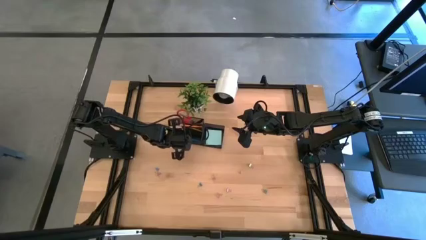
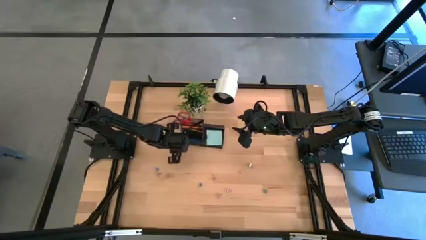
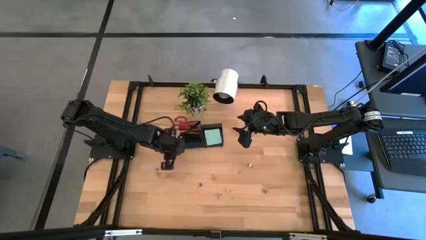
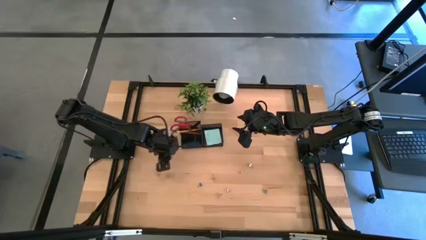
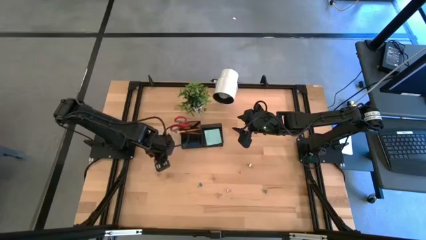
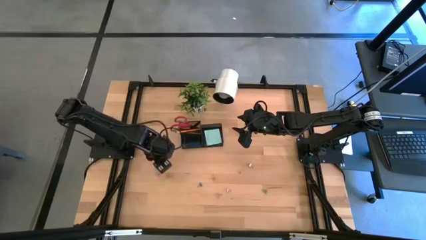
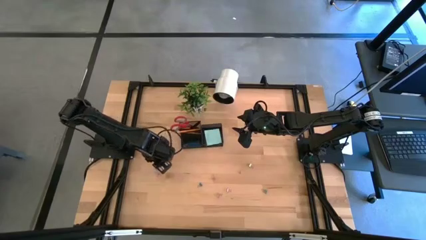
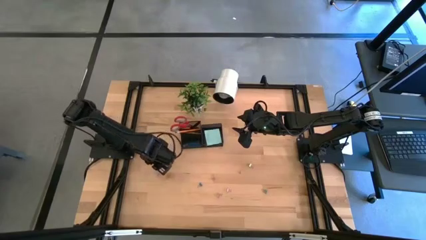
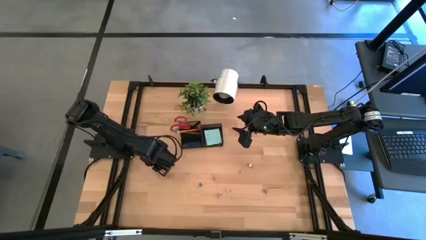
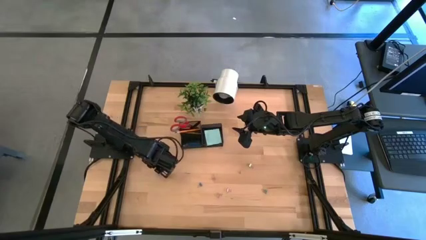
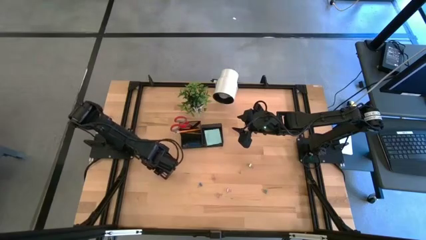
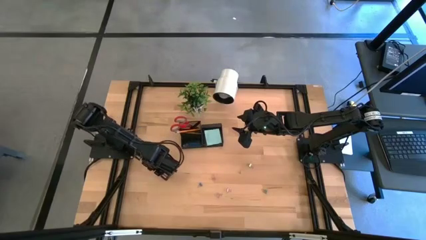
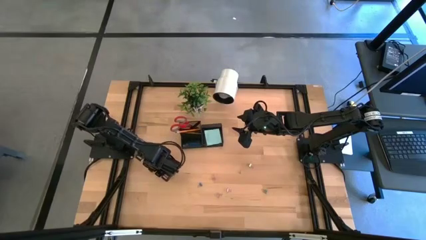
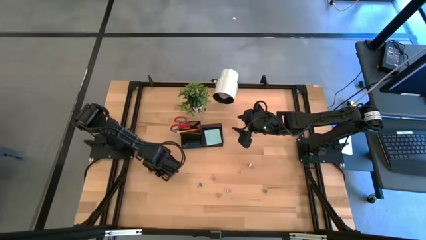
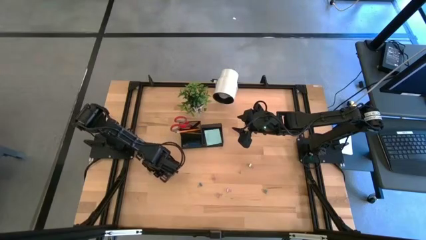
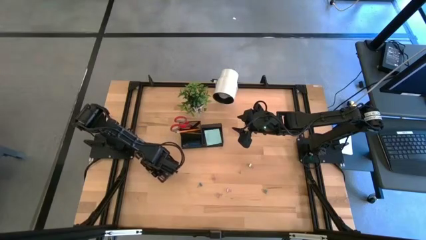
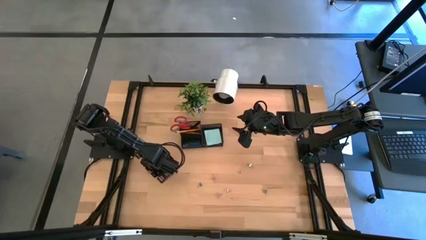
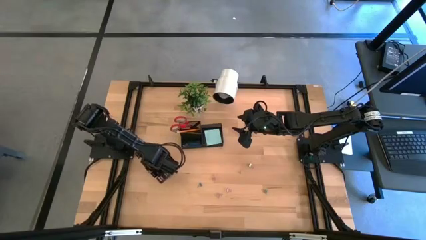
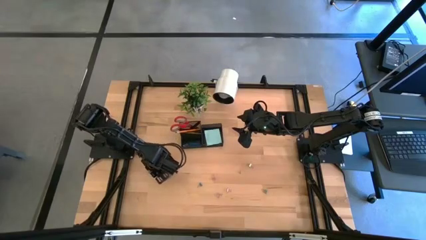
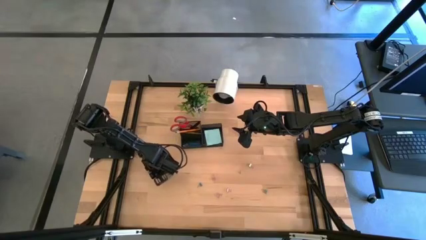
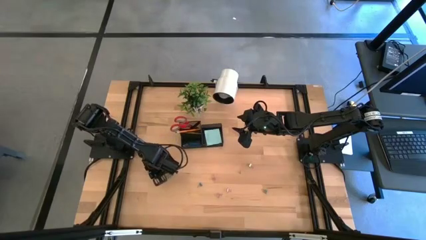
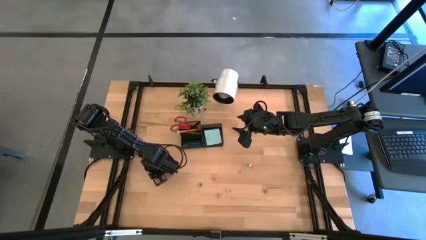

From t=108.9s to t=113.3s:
Task: Pick and place office supplies into organizer
Put the blue binder clip into the black desk organizer

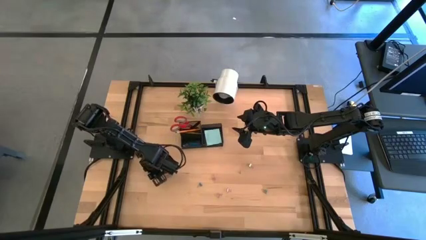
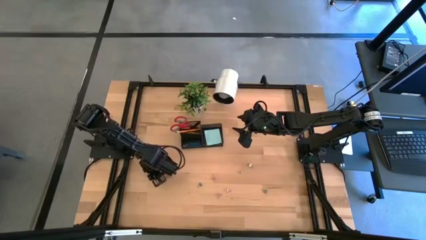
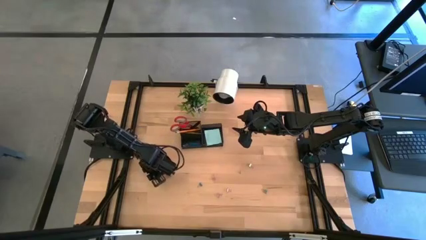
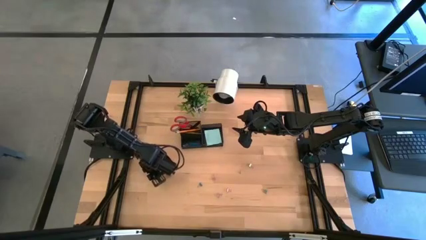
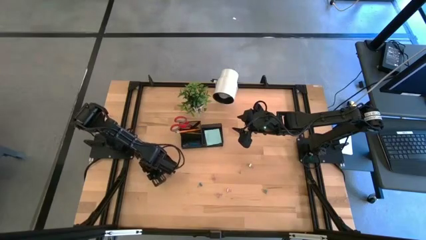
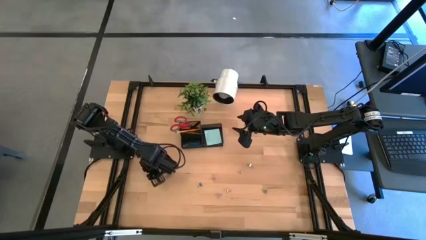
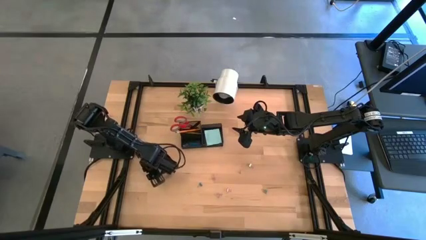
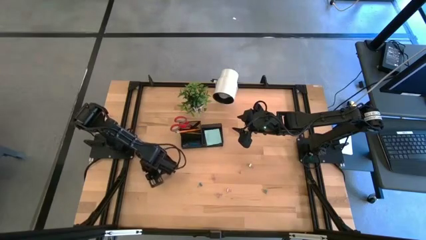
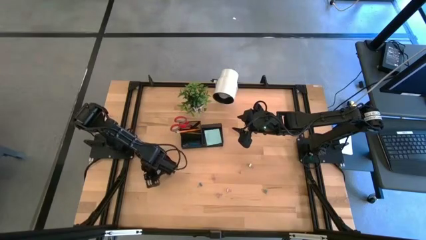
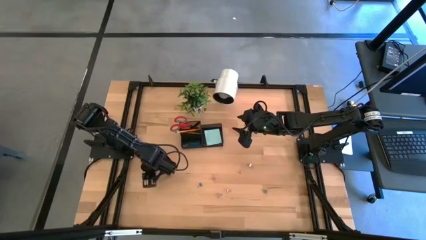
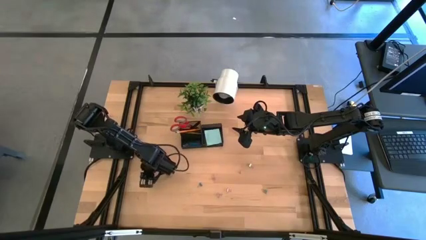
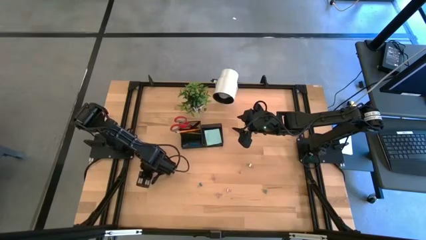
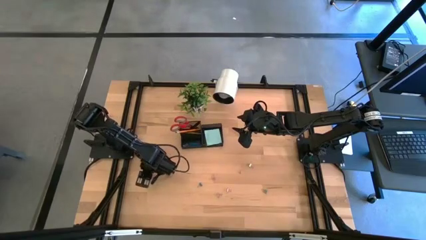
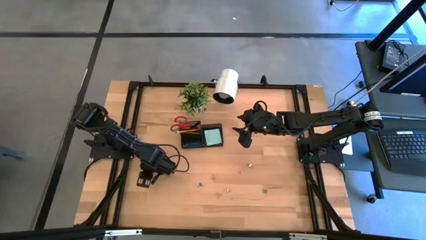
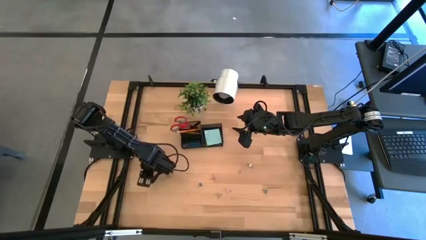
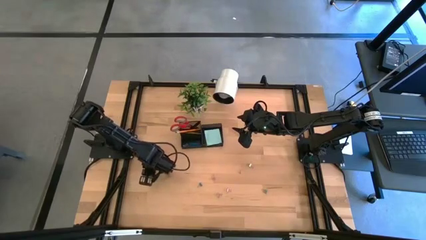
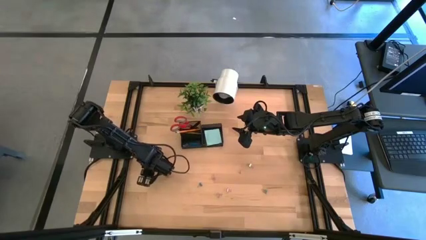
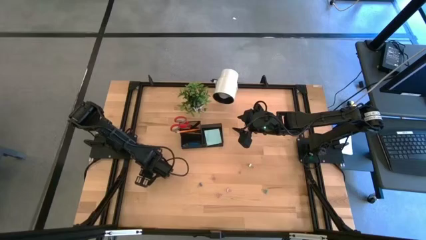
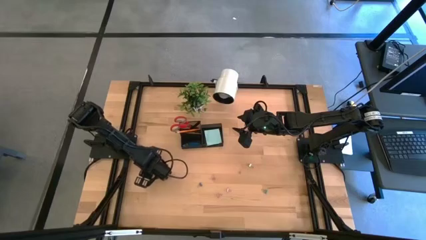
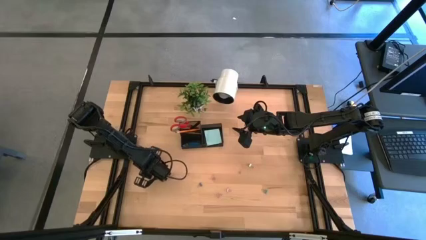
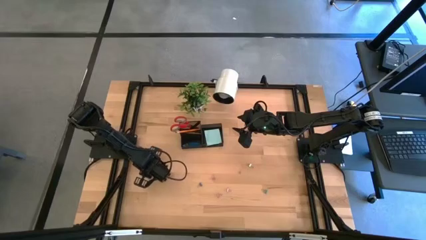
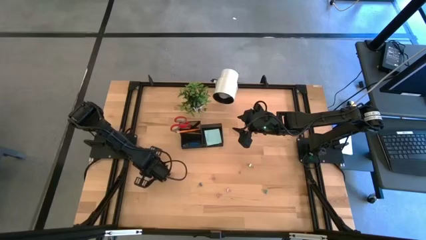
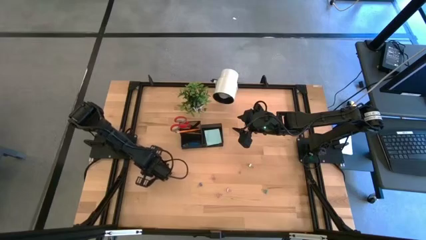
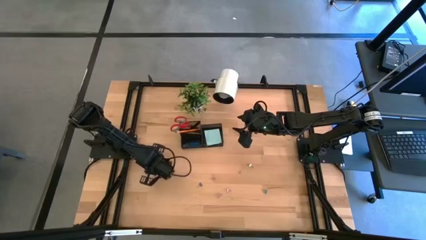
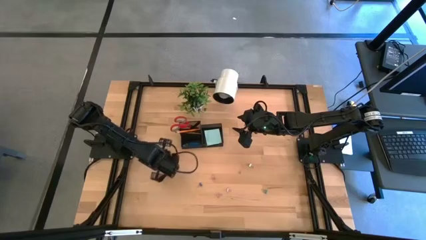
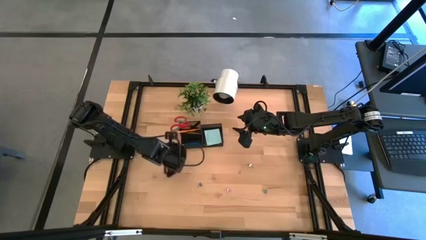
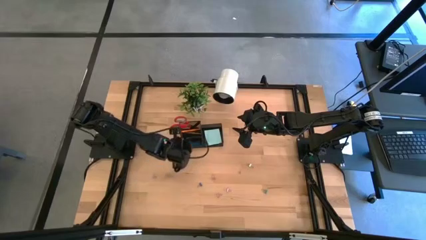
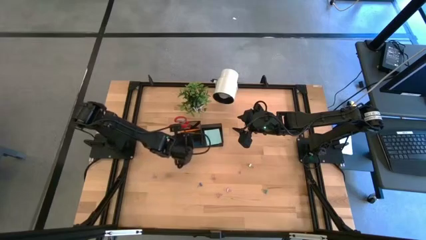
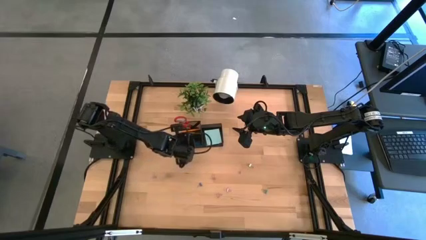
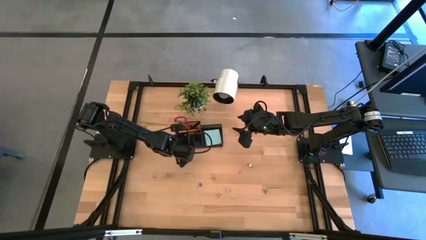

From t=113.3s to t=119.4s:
Put the blue binder clip into the black desk organizer

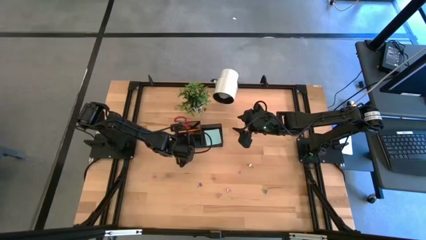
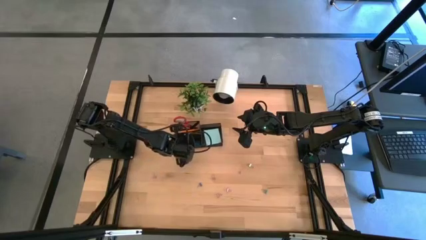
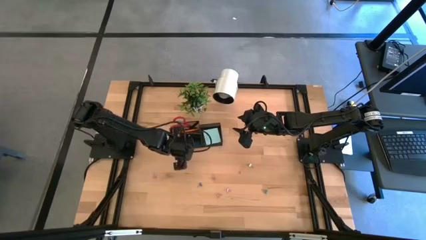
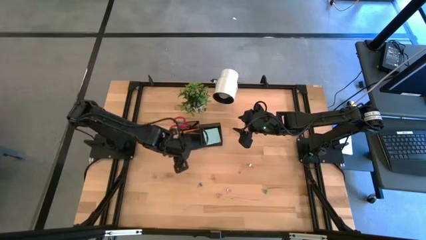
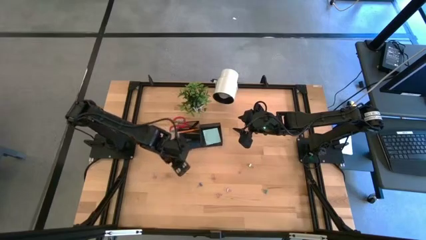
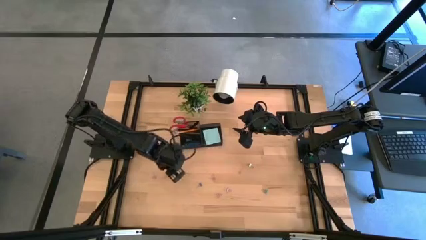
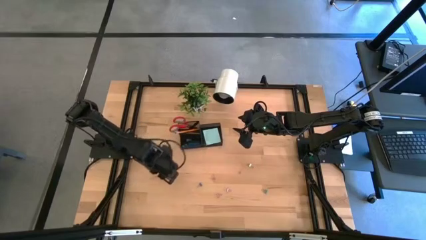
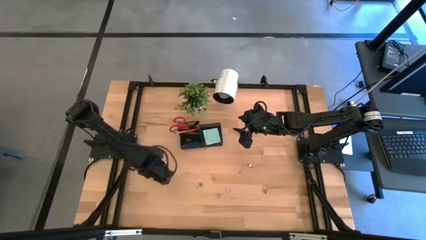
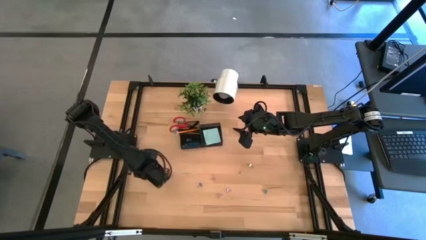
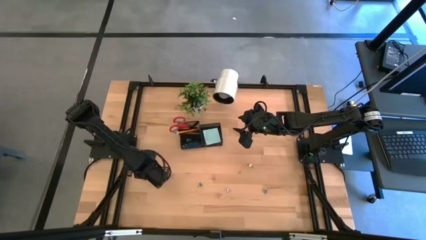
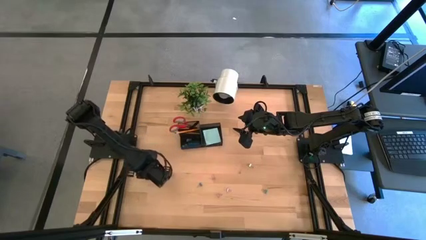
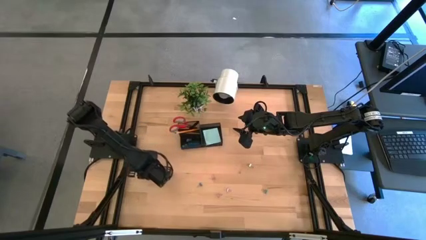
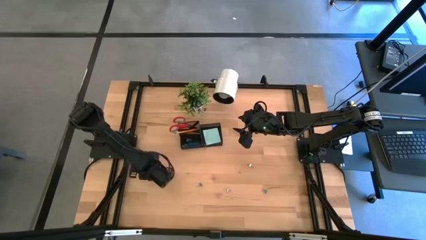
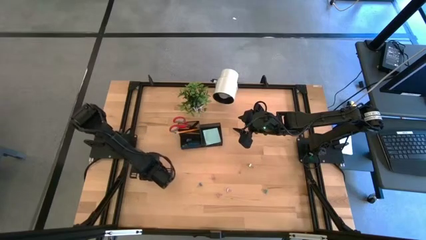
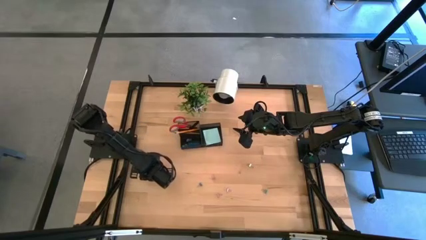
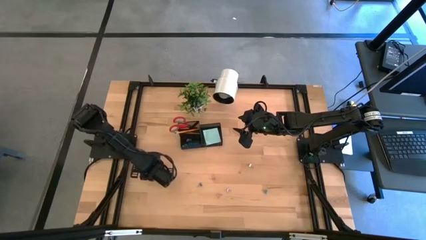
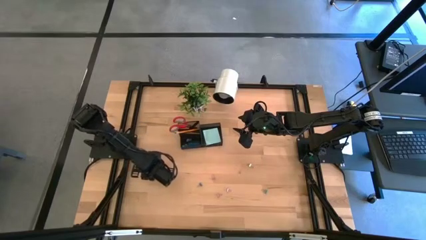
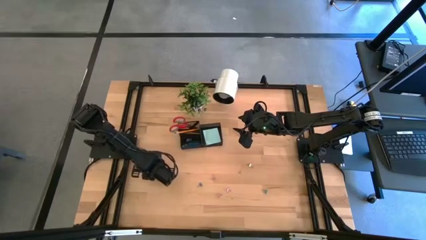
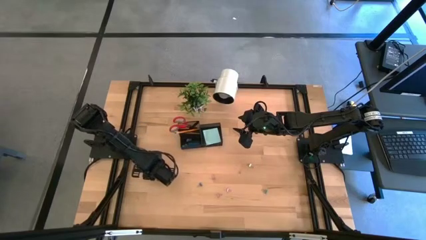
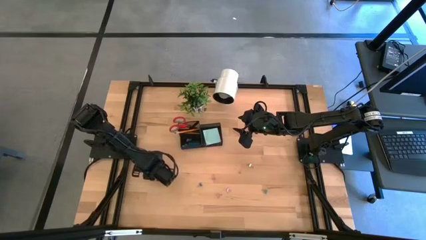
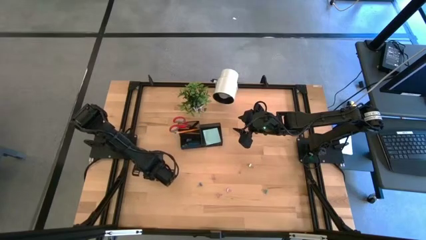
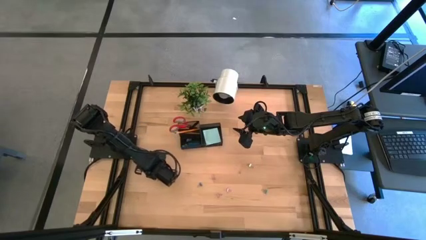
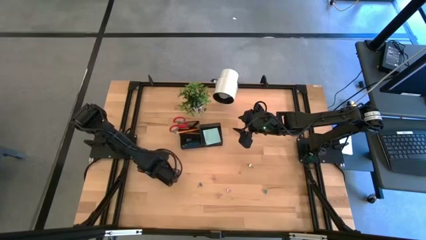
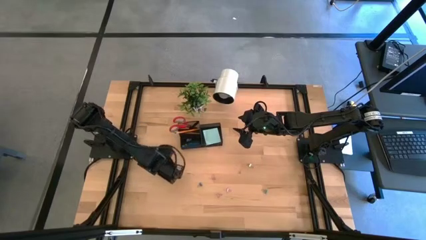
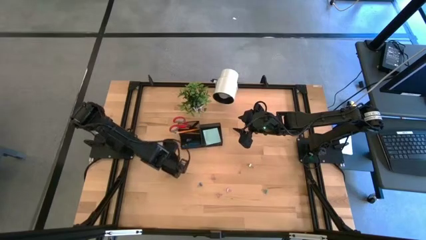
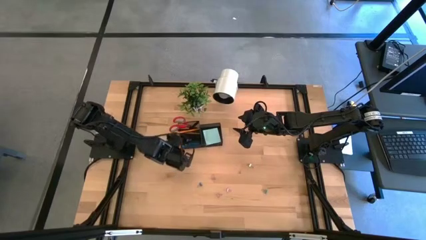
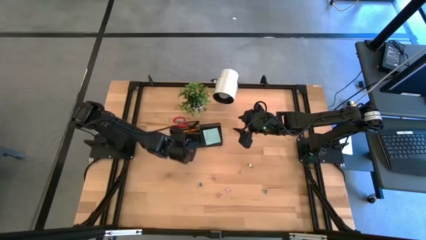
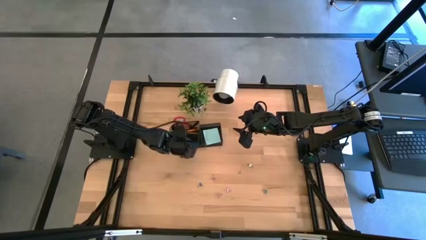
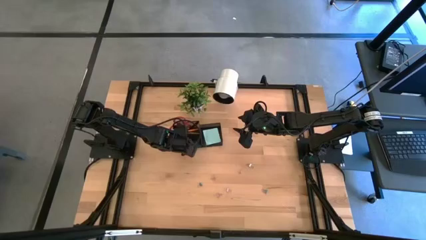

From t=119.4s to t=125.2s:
Put the pink binder clip into the black desk organizer
